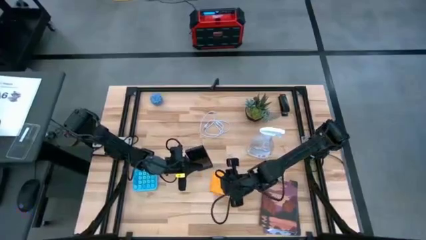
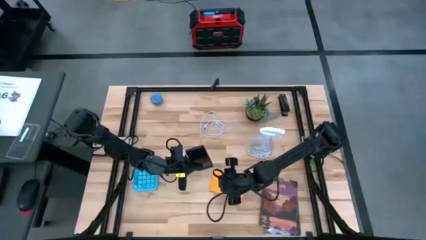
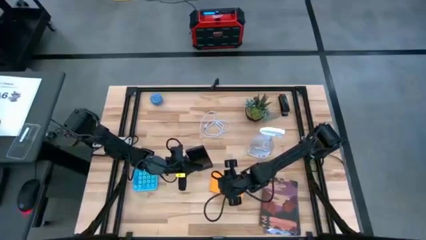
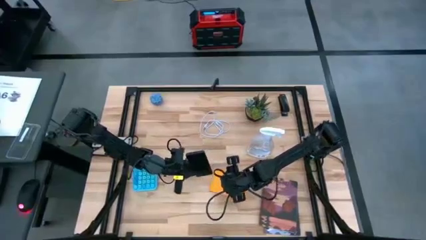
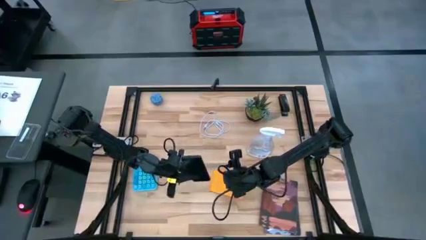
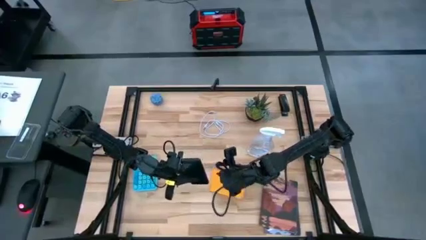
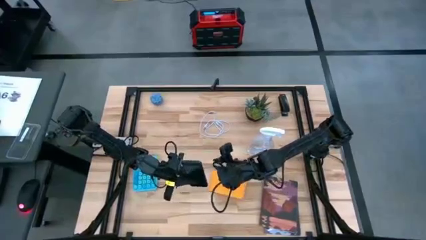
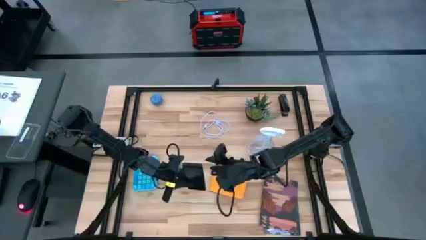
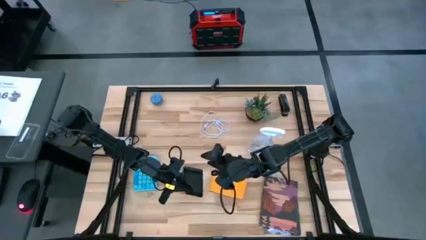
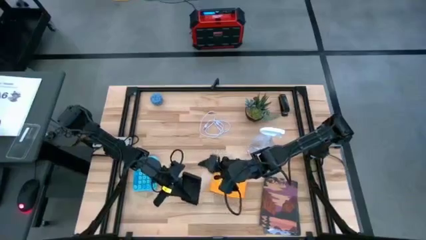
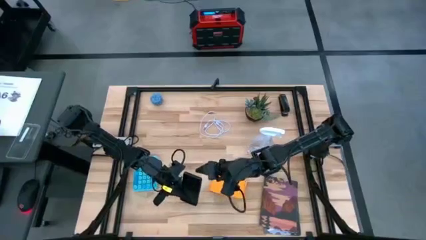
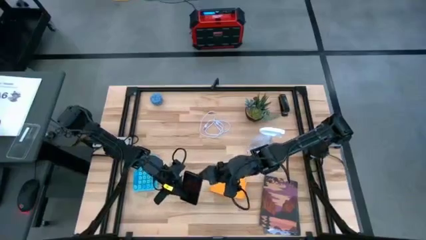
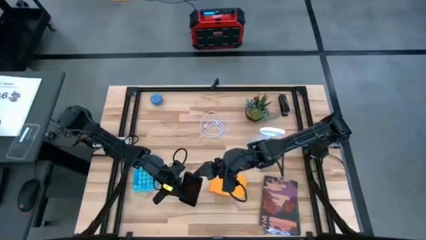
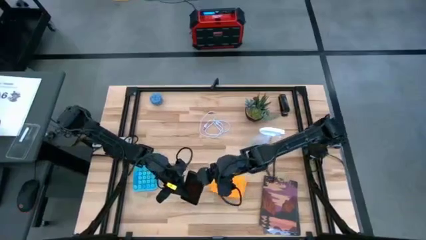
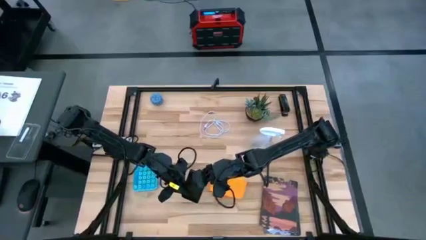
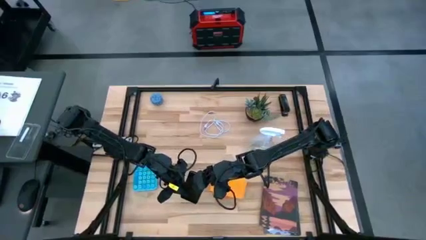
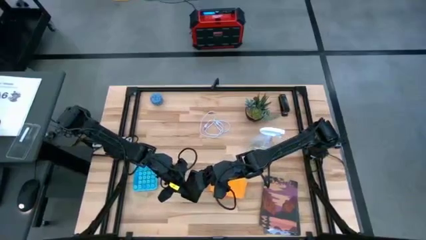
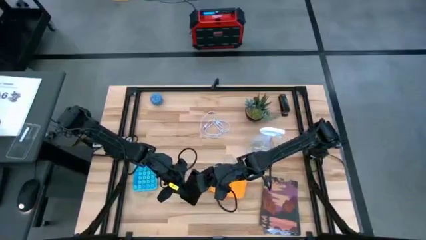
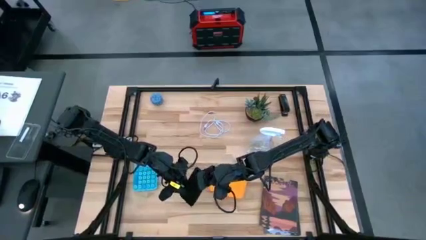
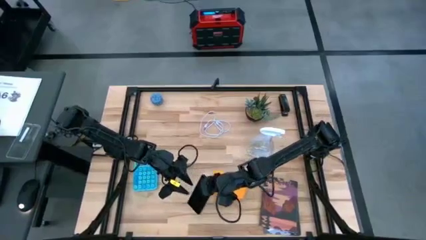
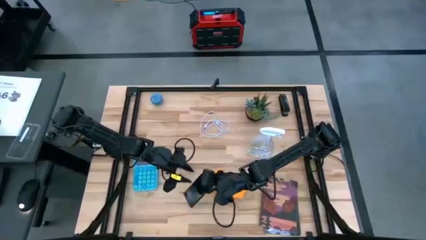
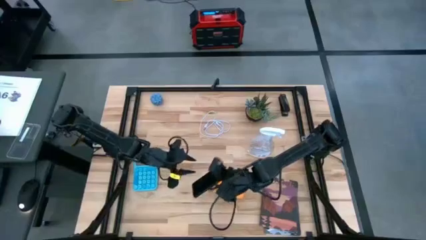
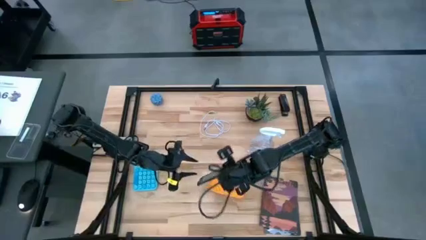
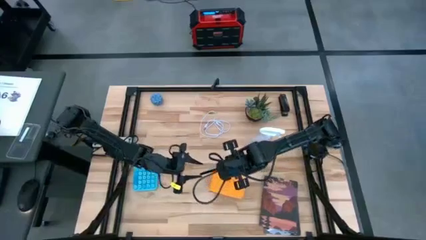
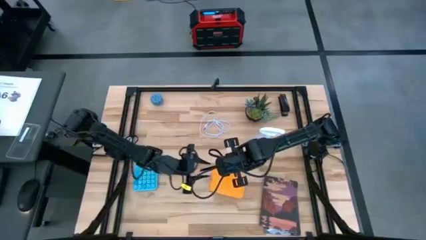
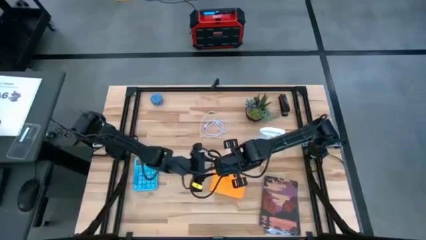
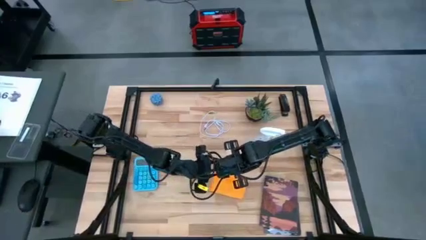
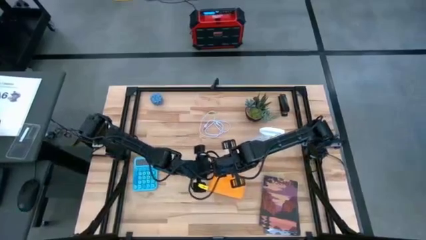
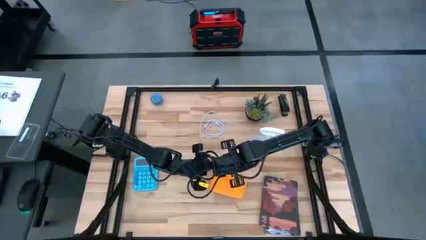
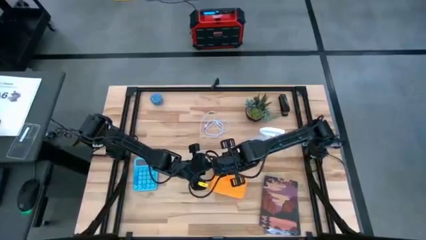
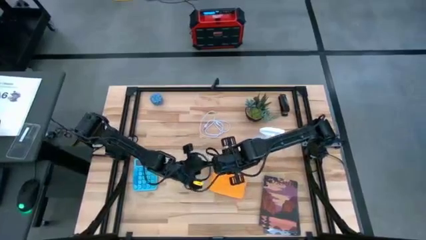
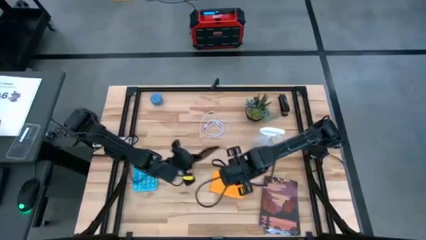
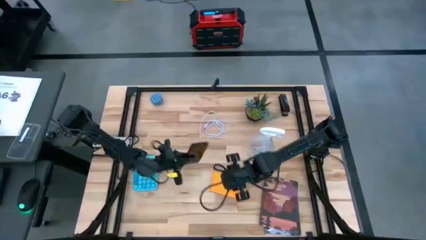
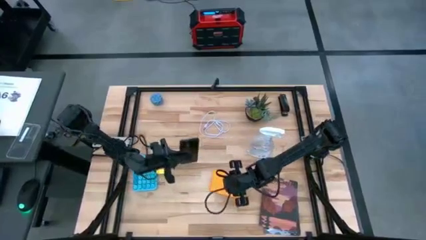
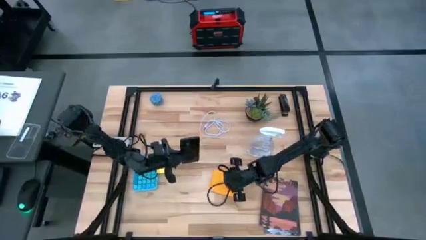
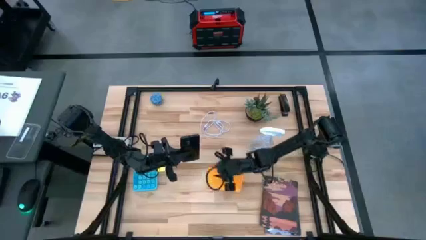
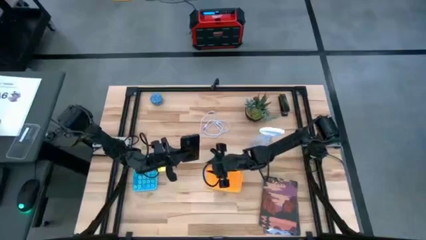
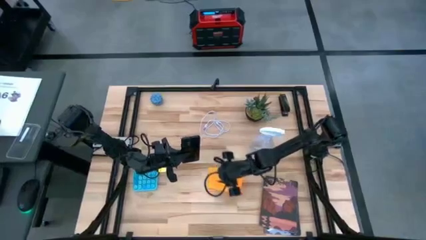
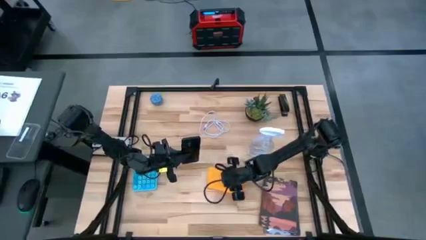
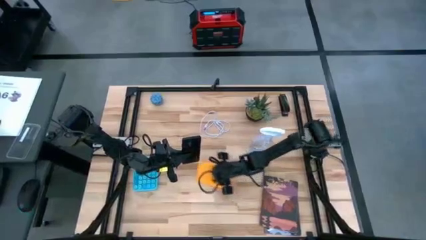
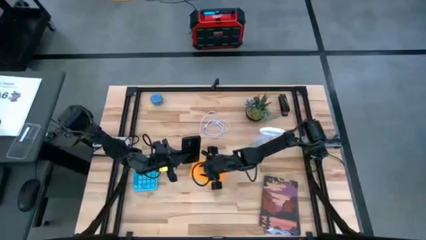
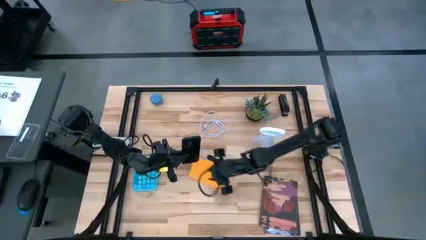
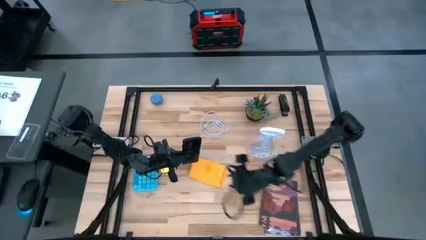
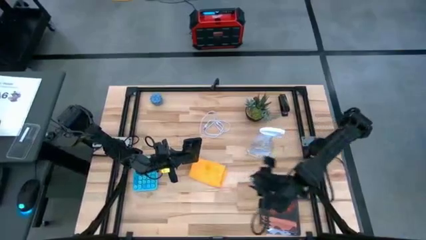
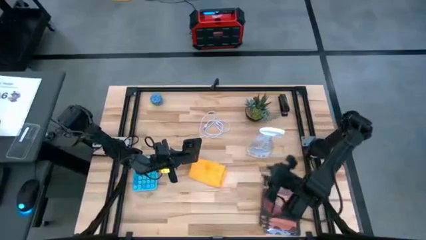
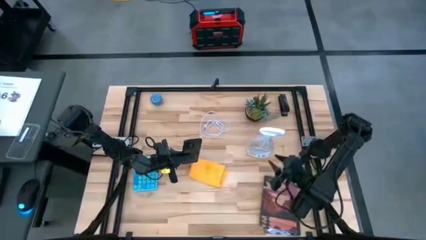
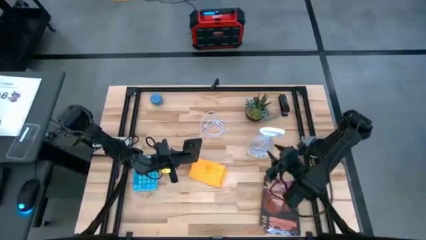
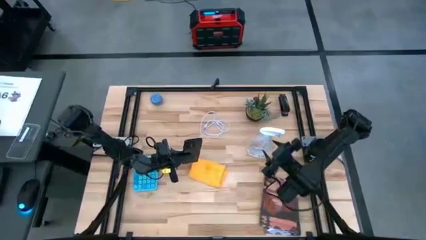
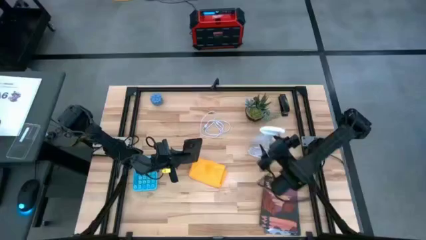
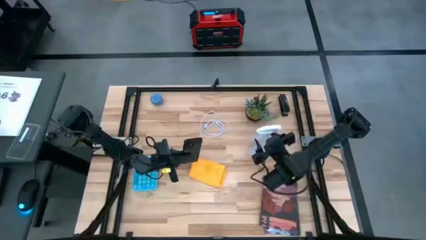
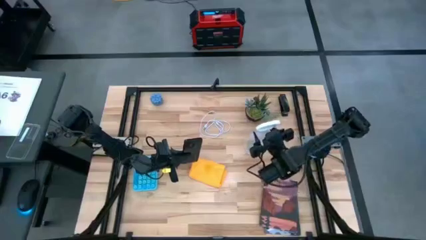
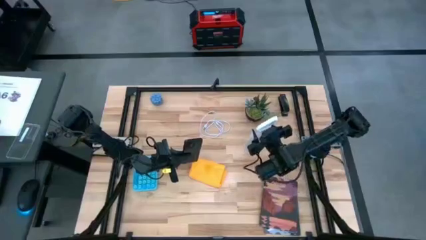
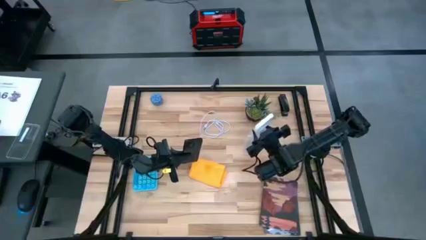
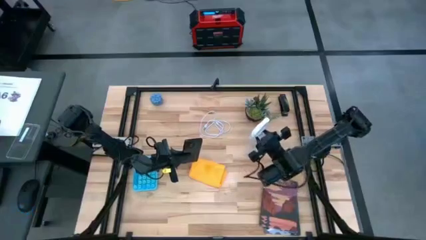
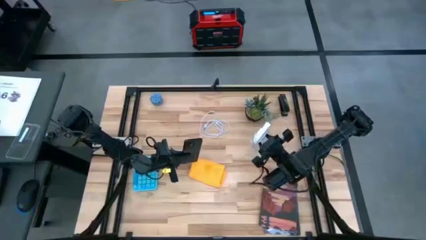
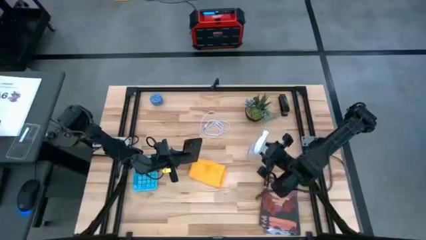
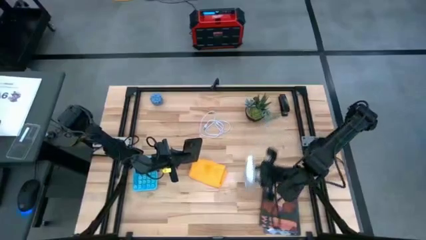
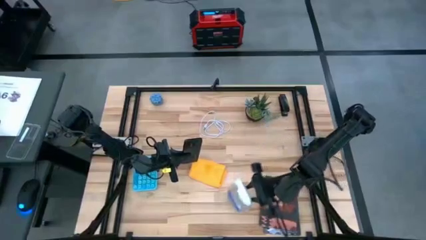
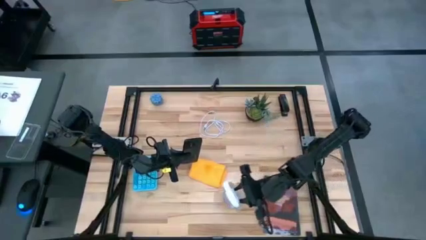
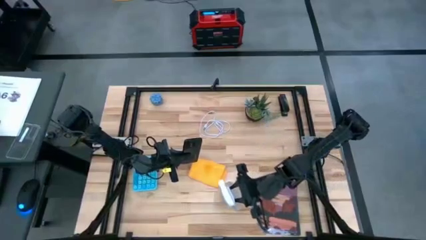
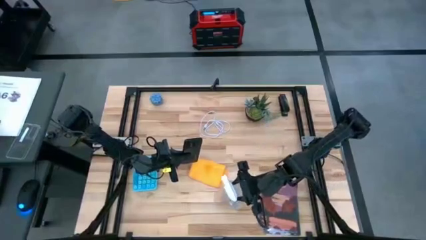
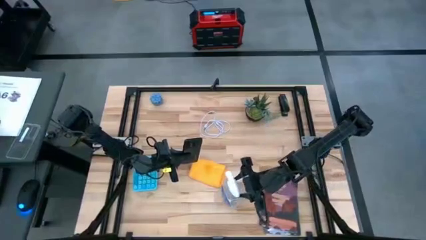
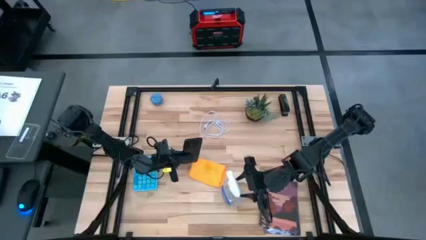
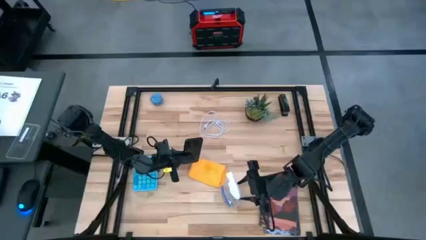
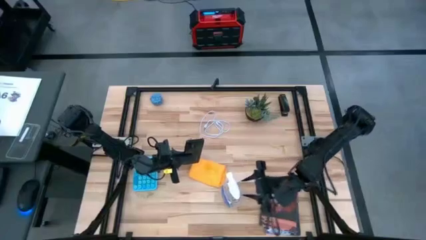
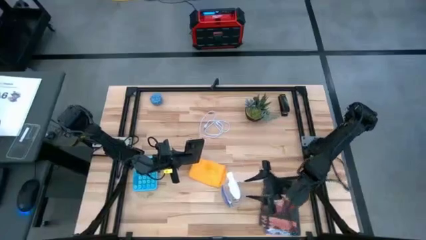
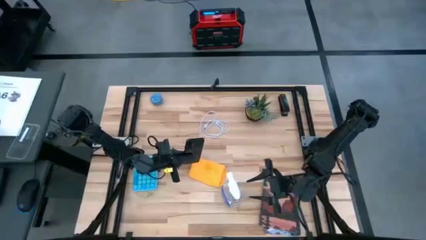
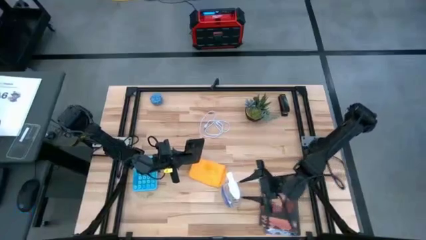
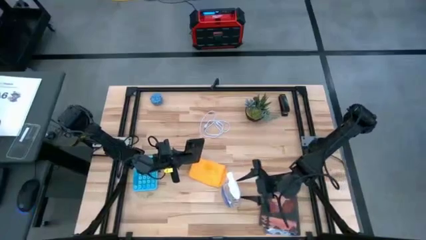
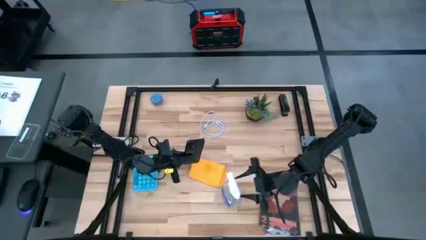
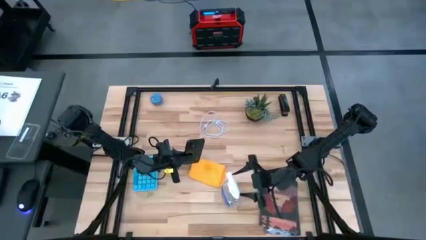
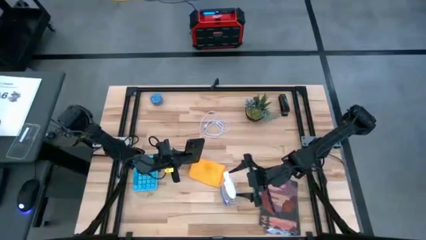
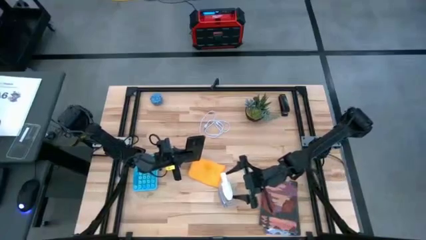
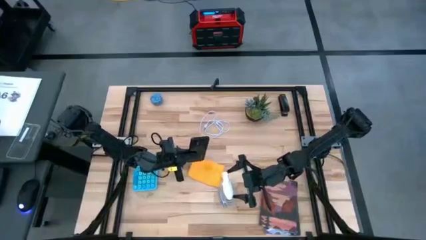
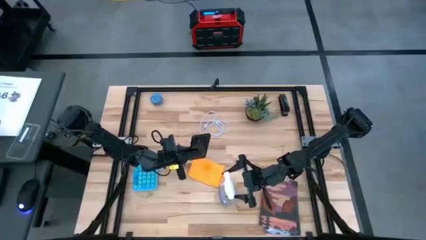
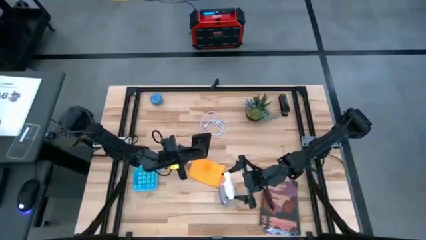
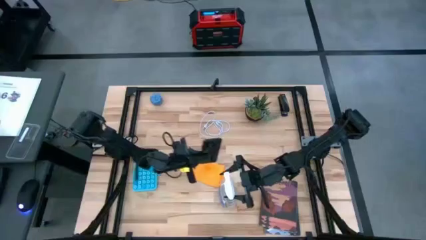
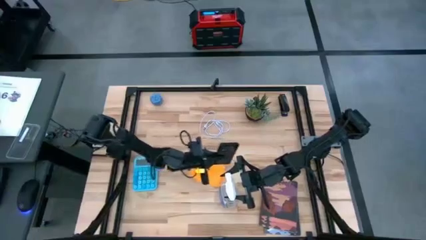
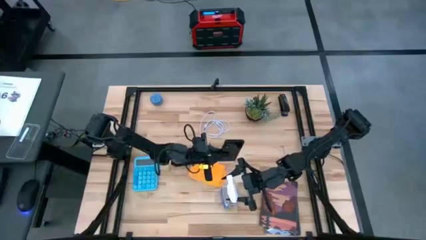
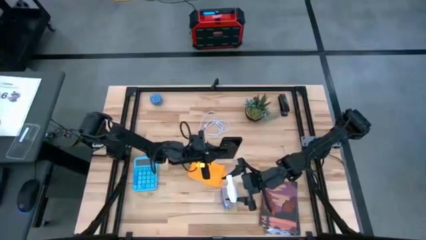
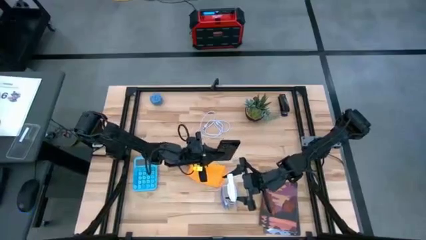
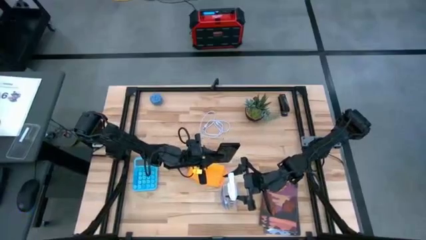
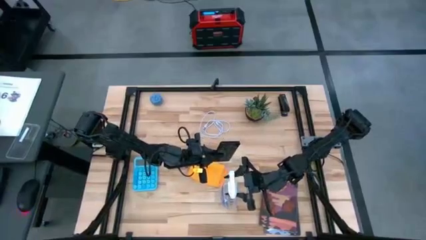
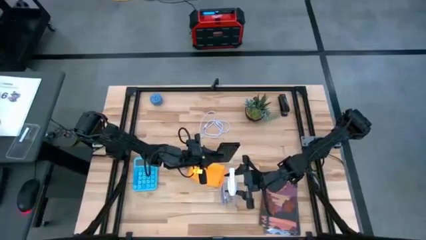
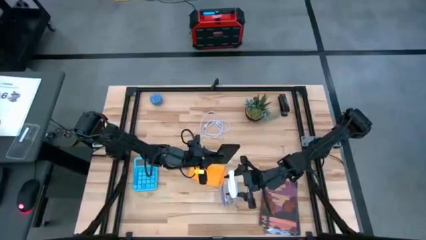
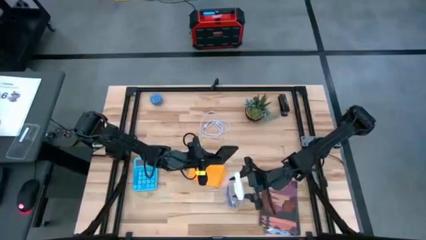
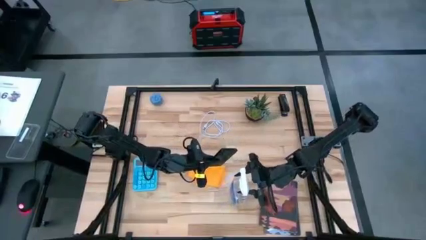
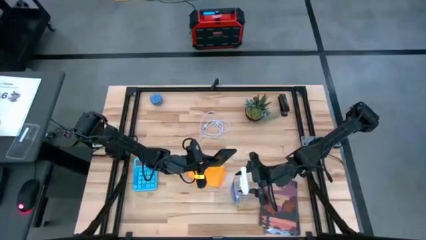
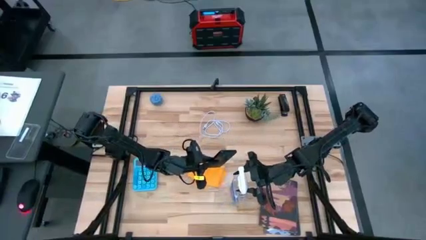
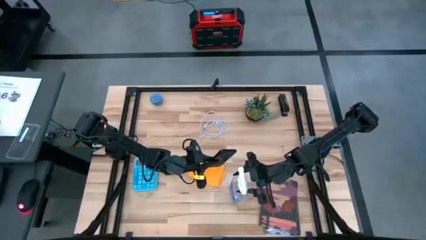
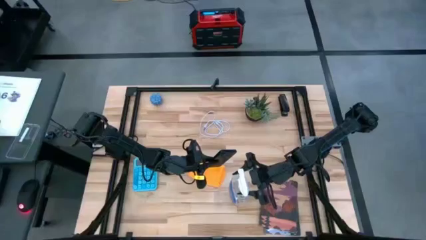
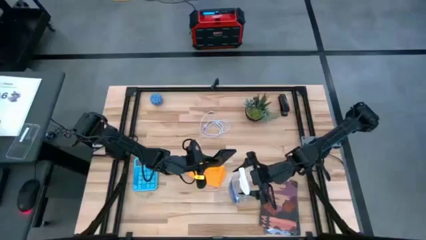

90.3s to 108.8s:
Task: Apply microfiber cloth
Spray the black cellphone
